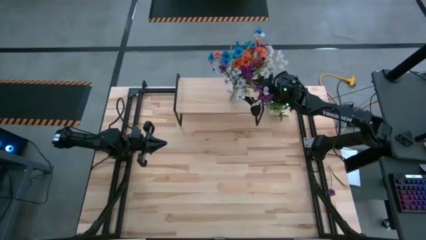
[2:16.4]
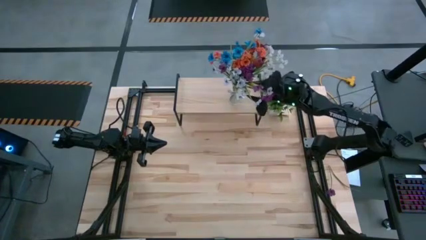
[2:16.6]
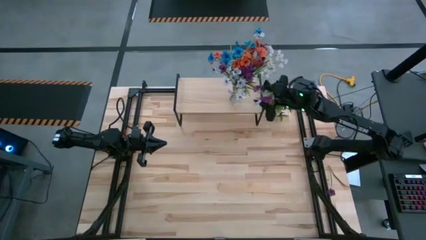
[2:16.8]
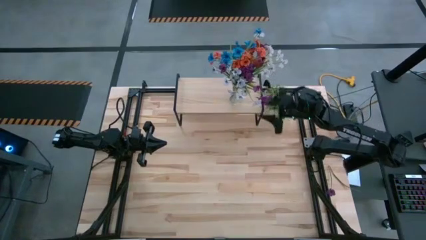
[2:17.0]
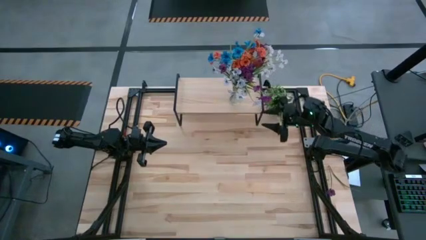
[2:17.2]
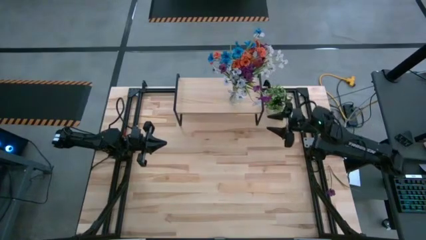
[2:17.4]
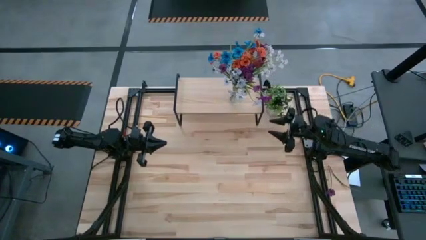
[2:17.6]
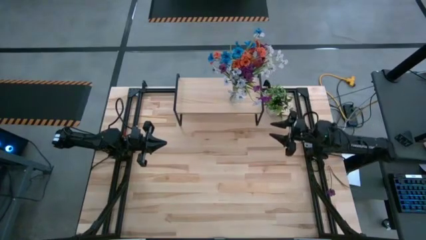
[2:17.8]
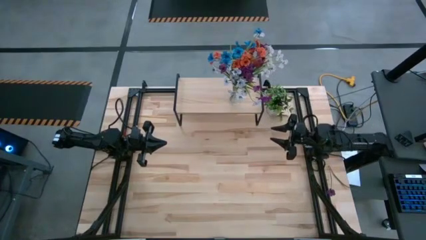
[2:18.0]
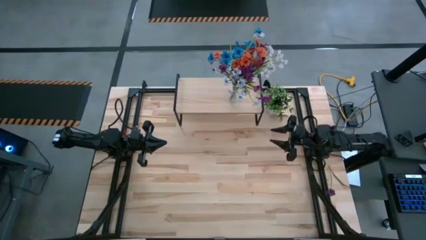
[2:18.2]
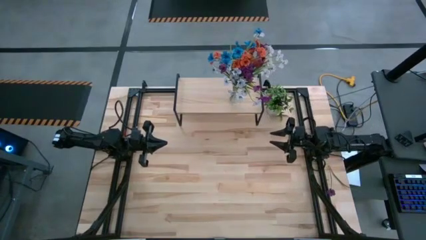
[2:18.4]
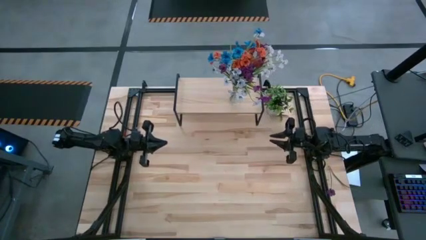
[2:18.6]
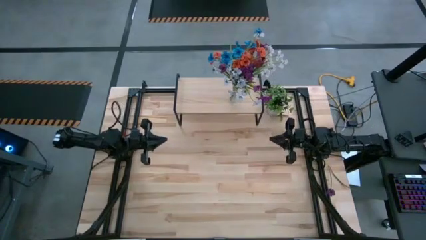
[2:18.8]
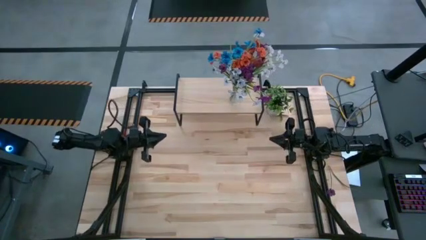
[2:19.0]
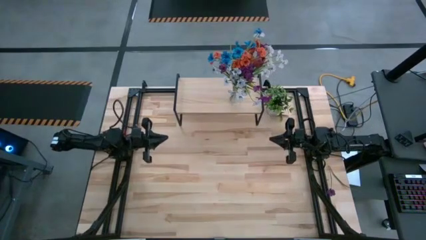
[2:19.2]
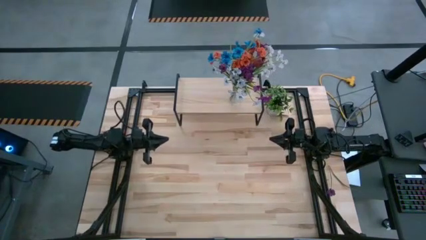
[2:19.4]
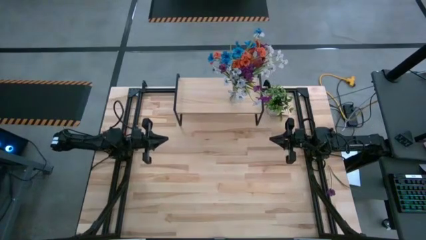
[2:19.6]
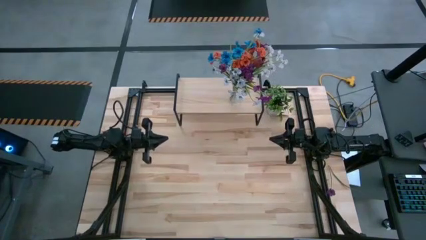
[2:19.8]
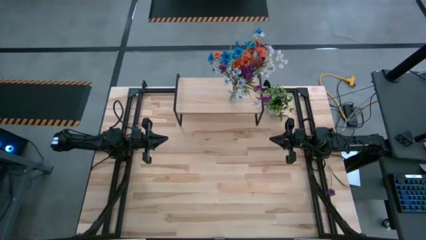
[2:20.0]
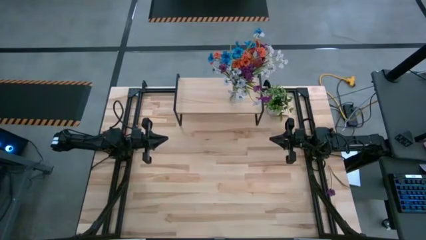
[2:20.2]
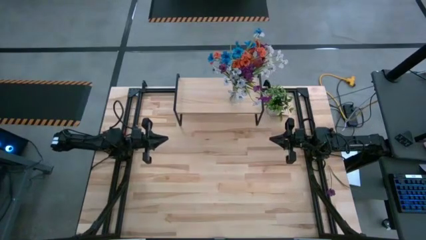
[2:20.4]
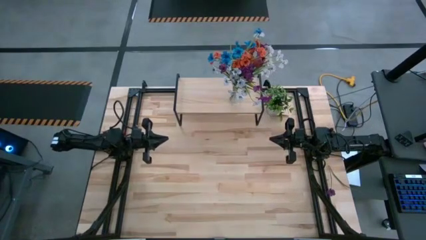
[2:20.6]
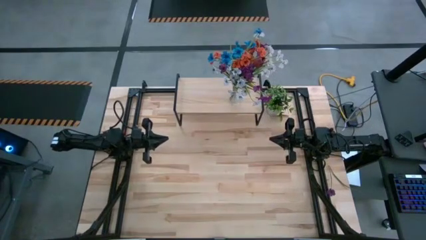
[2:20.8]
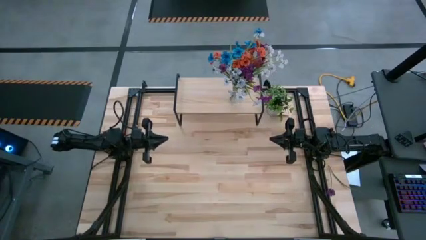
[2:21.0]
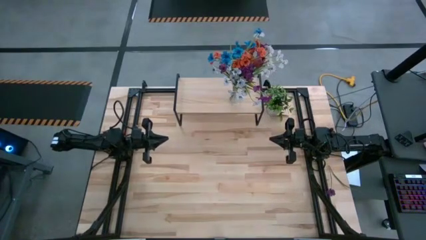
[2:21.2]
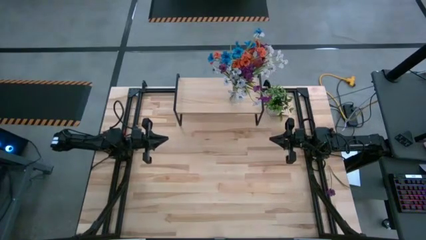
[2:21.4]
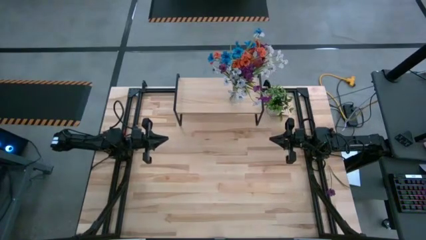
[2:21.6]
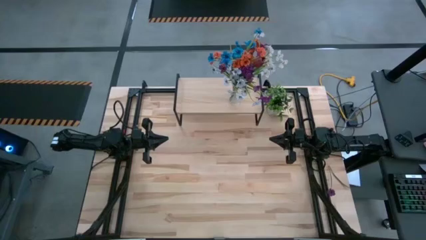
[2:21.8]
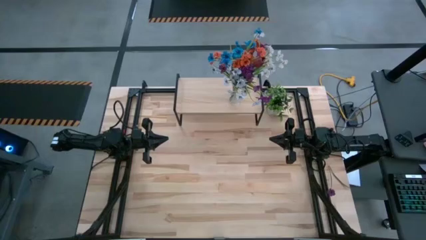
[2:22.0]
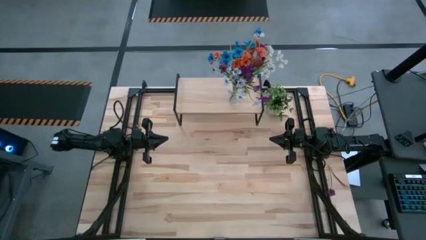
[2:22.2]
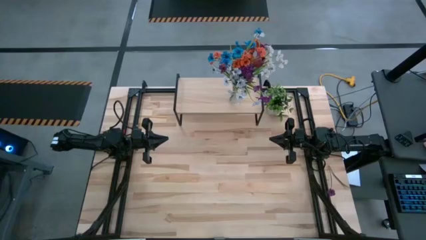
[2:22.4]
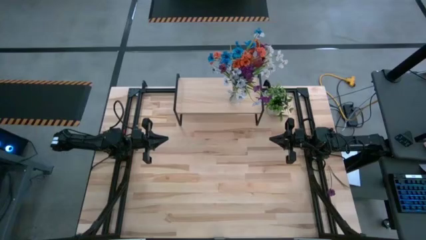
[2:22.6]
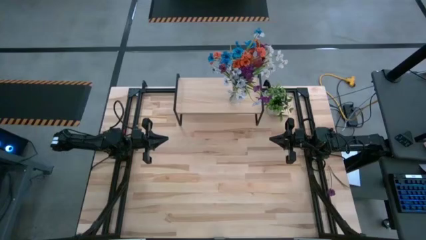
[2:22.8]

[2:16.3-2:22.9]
Task: Pick and place flowers into a vace then onto a shelf
Return to Home Position

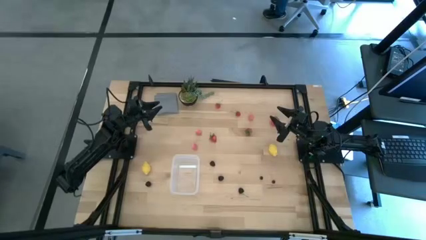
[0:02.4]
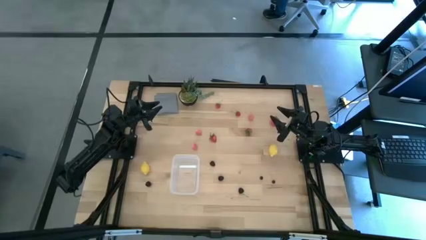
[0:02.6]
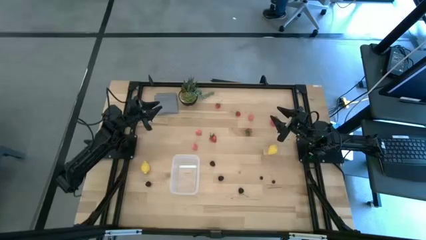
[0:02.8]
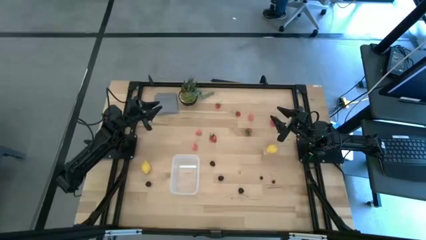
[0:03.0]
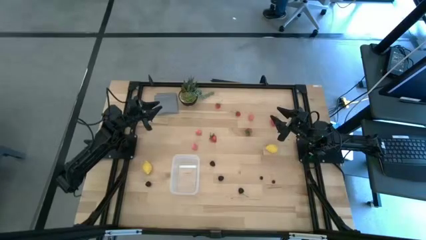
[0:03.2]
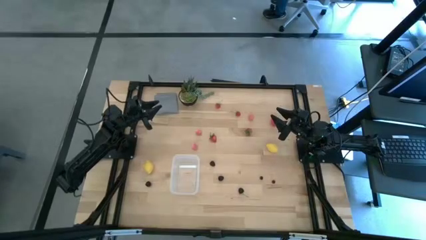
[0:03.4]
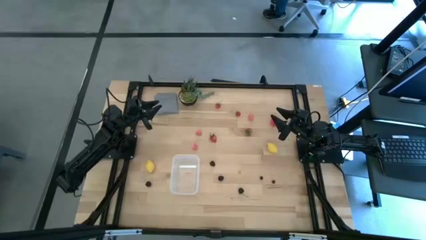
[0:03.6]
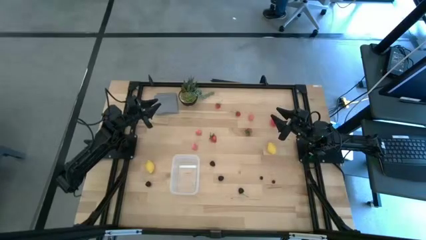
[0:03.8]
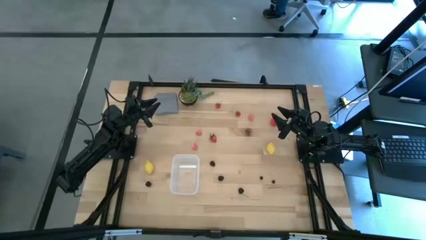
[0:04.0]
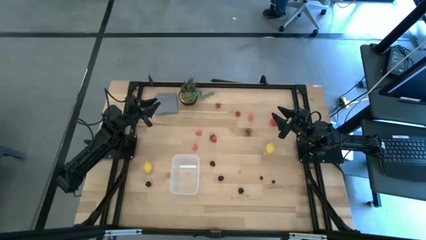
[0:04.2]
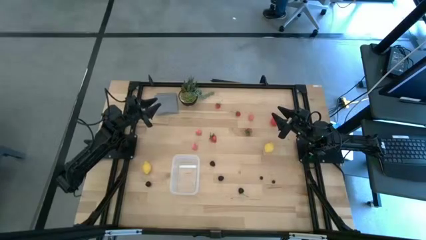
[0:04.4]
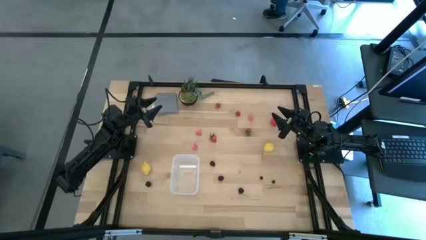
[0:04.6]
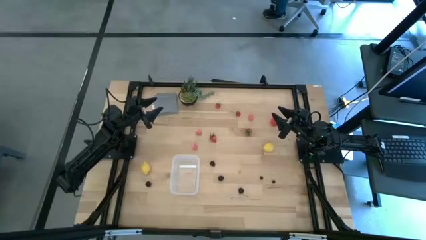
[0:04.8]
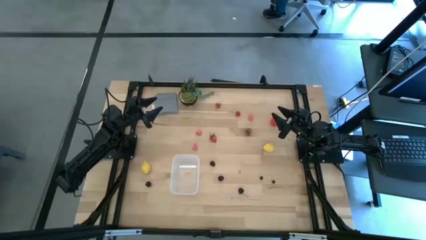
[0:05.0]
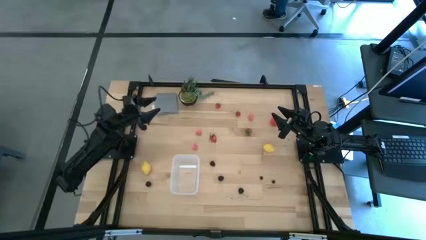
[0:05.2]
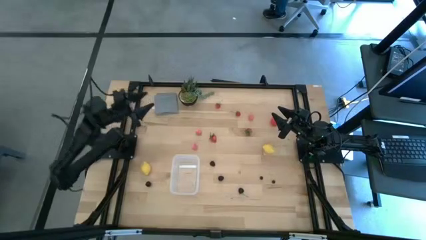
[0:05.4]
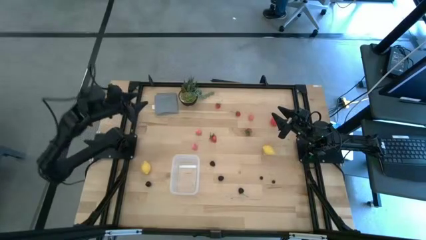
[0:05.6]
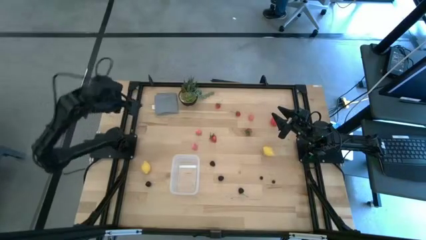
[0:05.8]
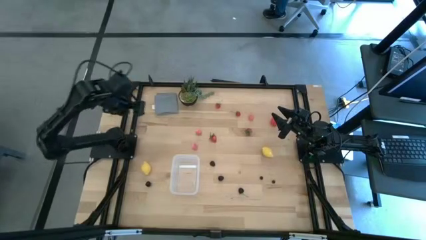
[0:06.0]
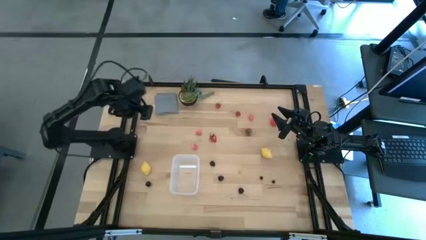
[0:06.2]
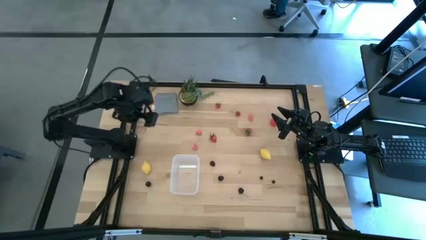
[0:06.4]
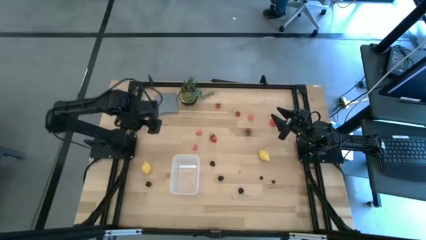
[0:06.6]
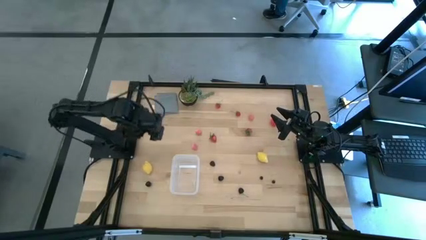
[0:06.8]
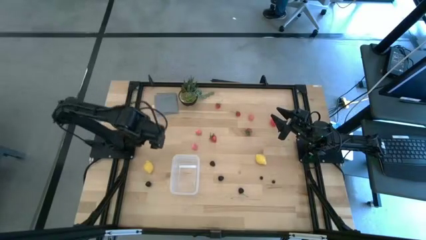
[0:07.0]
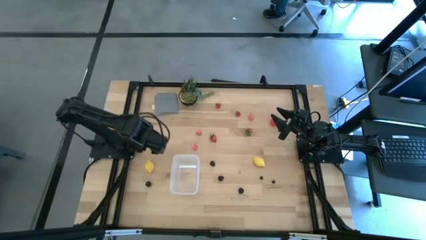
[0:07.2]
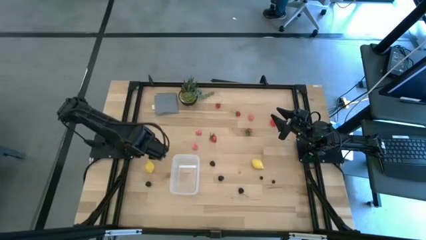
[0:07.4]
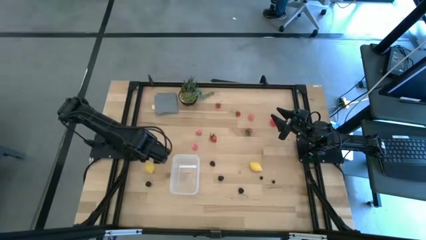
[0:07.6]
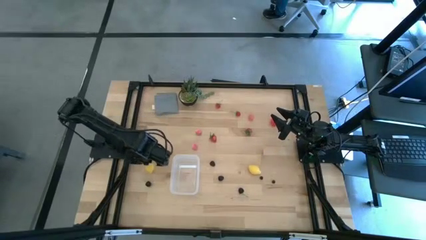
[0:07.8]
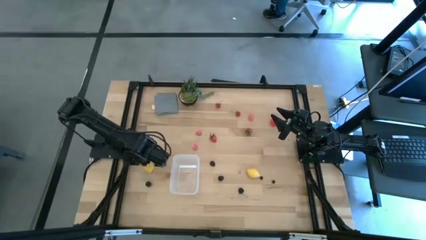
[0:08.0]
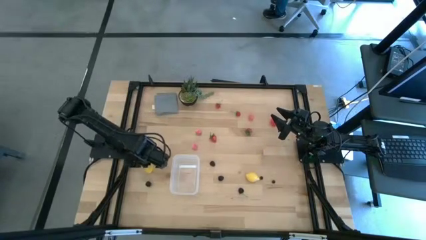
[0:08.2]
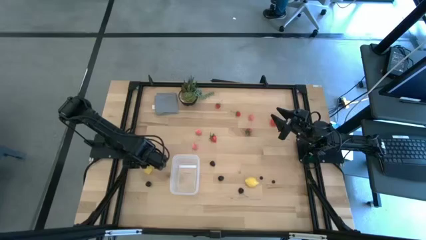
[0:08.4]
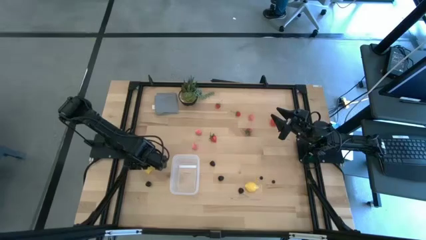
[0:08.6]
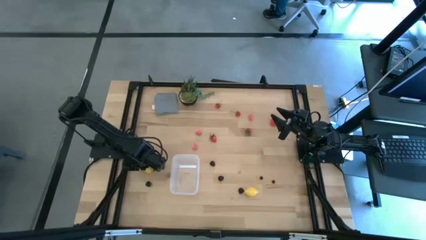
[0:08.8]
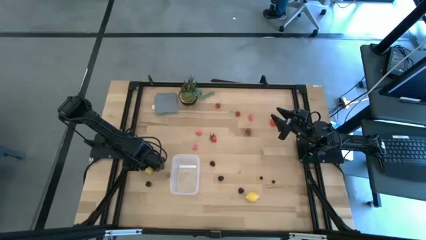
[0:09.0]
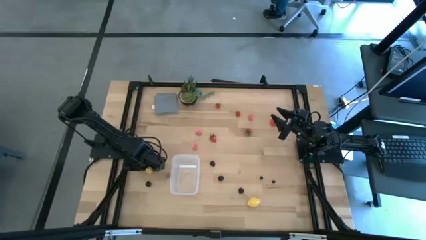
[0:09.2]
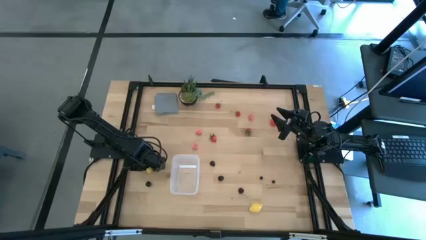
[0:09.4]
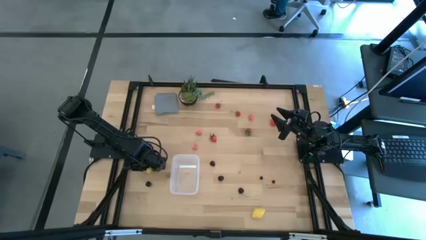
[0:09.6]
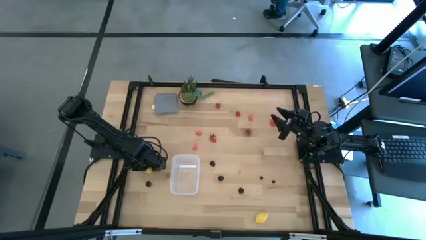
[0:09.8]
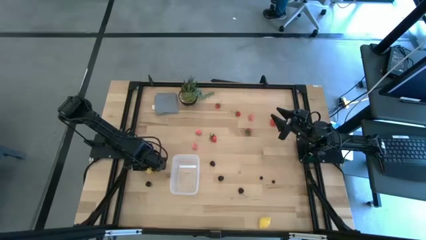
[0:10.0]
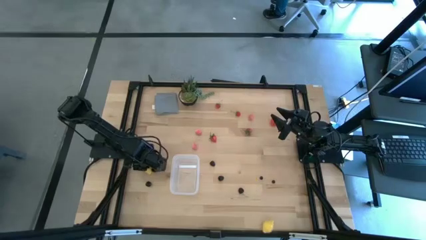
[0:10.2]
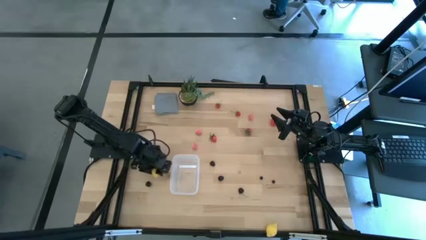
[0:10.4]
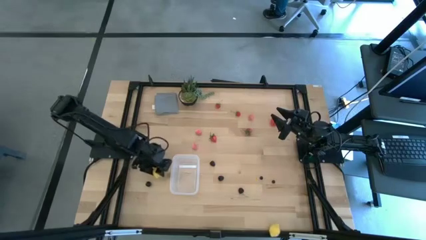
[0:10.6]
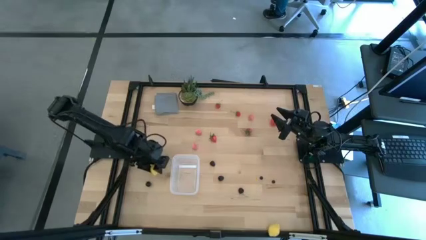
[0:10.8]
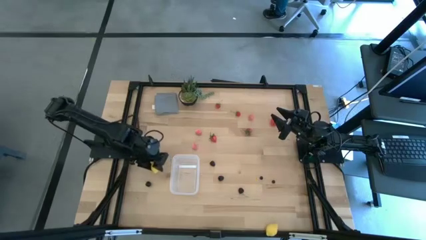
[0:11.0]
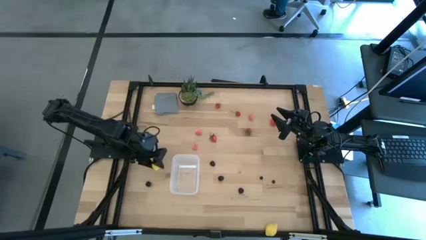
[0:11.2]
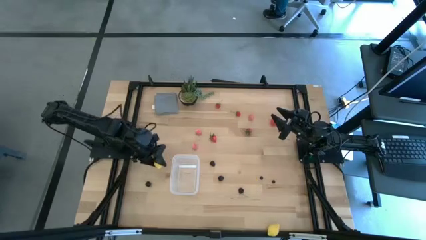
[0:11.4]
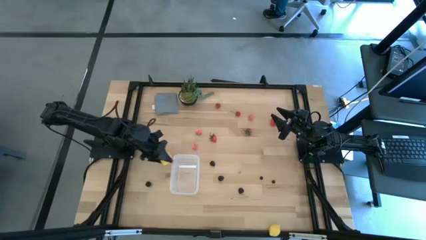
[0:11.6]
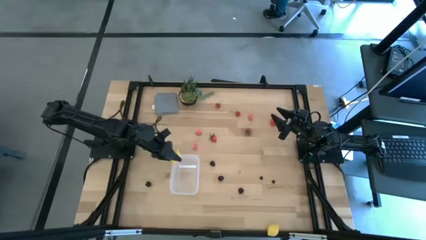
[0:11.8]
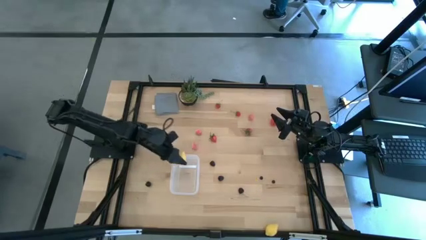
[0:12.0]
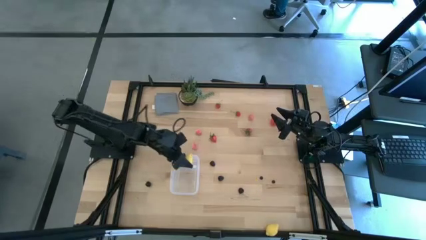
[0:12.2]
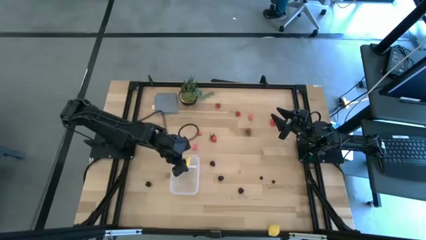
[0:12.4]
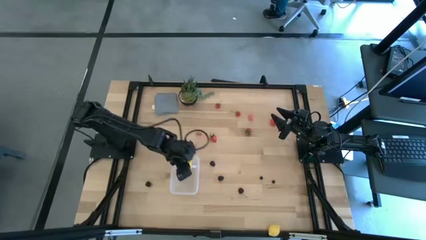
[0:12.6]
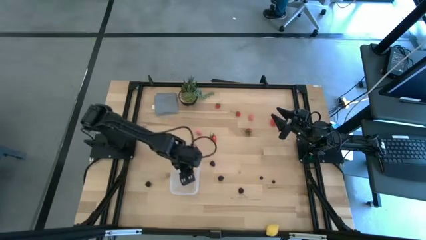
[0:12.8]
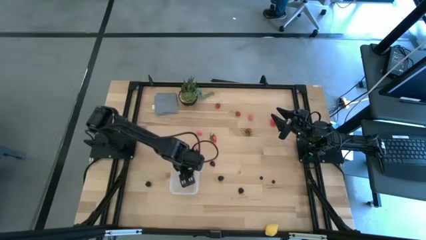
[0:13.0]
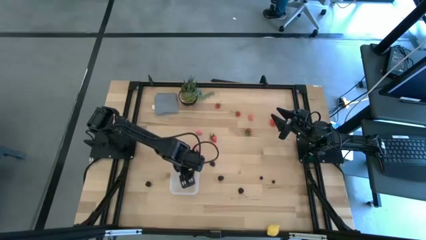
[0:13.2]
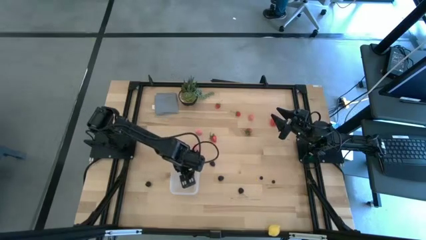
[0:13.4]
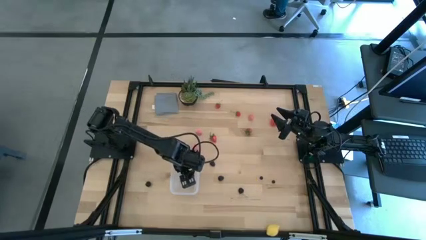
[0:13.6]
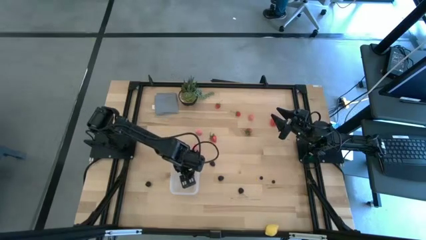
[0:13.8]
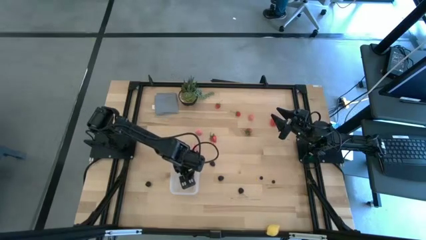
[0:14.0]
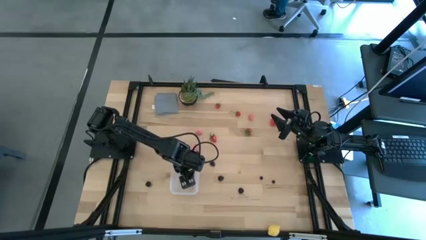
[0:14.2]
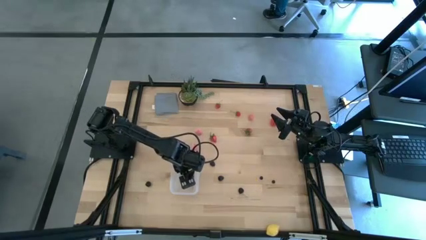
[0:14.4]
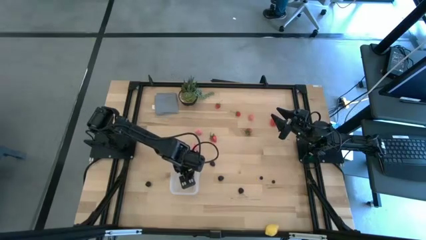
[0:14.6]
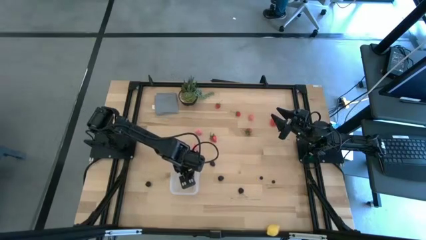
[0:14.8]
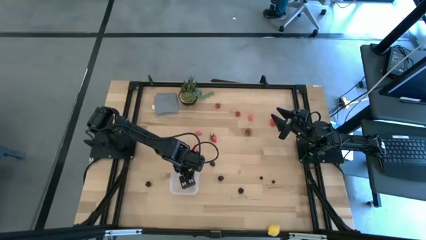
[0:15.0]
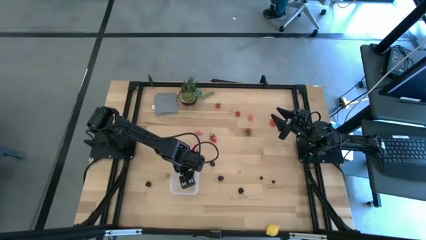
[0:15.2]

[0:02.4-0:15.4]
Task: Pick and placing Produce into tupperware
Put the yellow lemon into the transparent bin
